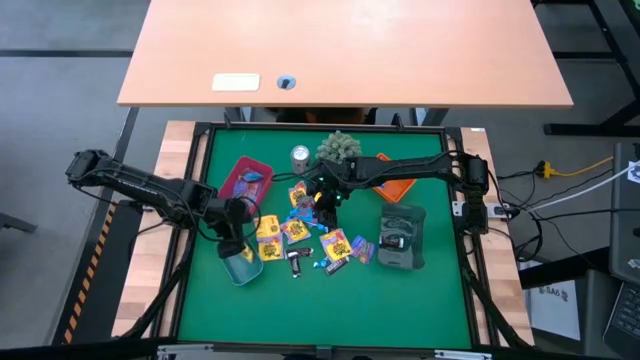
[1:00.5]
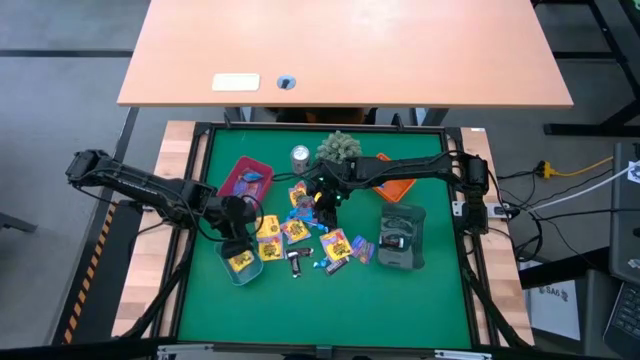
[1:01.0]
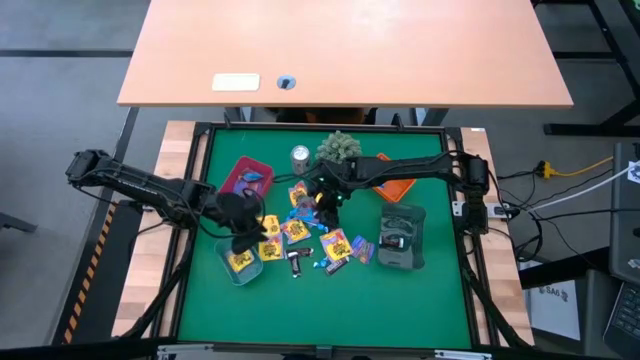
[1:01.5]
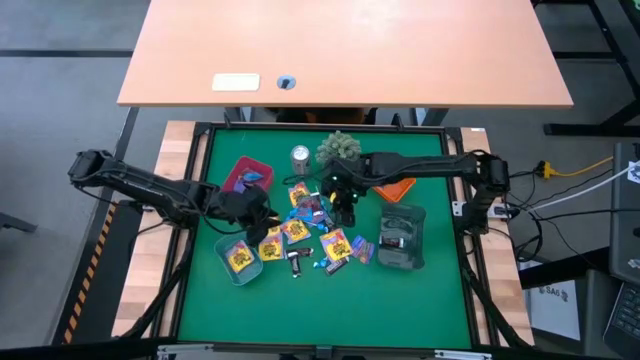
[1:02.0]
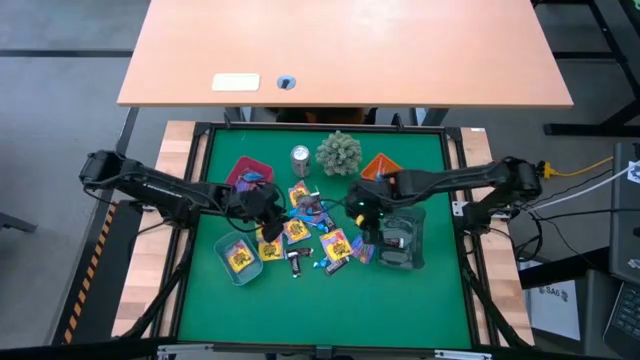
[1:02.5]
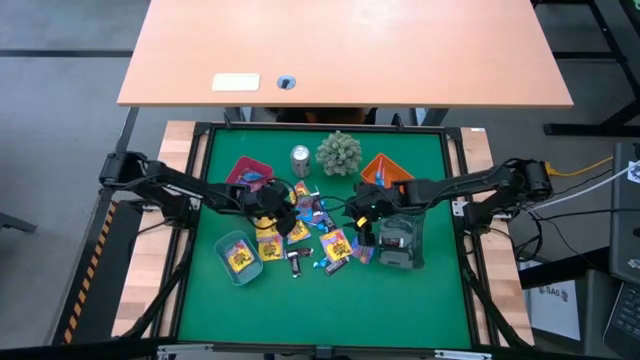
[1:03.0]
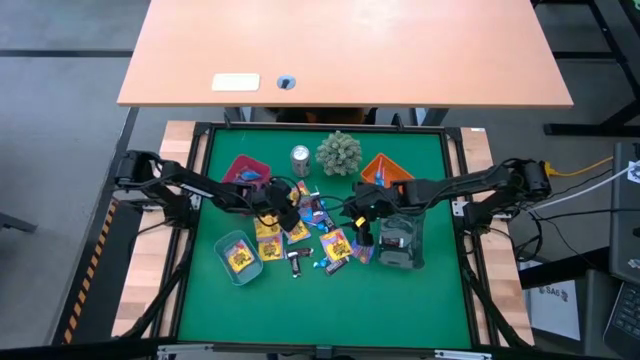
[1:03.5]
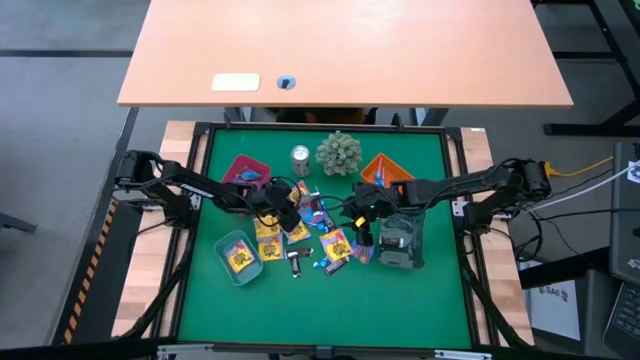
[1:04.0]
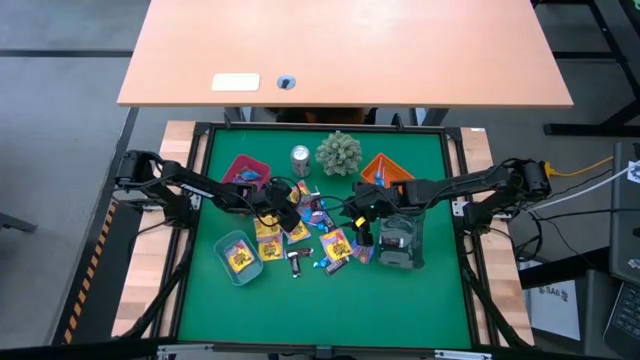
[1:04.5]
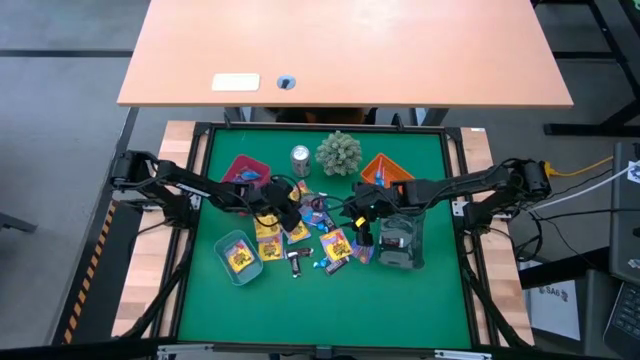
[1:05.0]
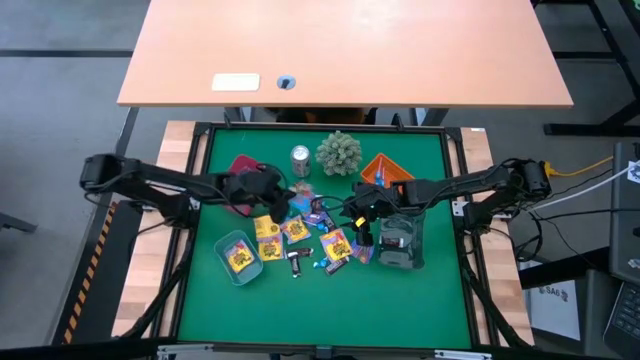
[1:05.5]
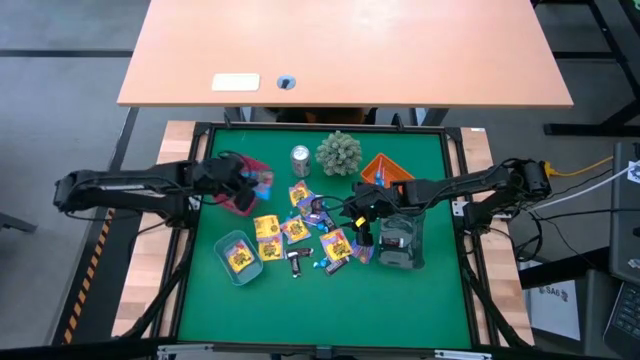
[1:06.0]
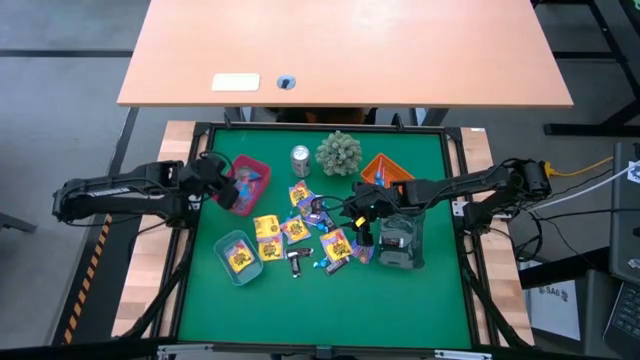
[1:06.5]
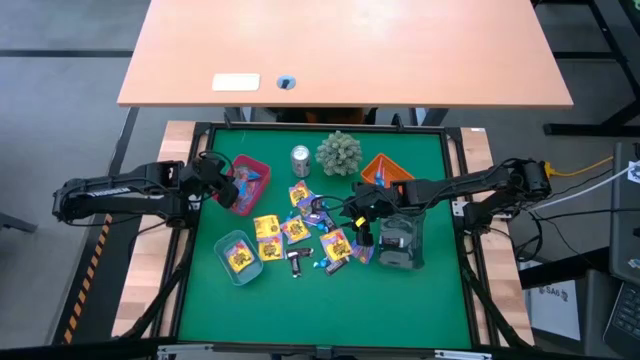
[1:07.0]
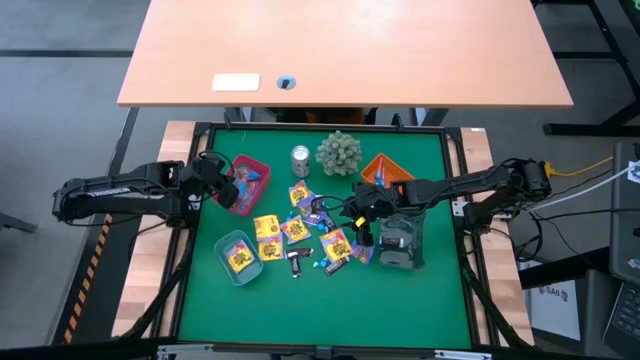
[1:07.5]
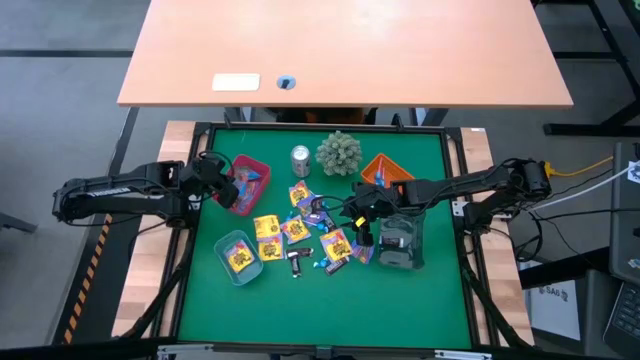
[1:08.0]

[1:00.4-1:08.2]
Task: Sort candy
Put the blue gummy into the red transparent bin

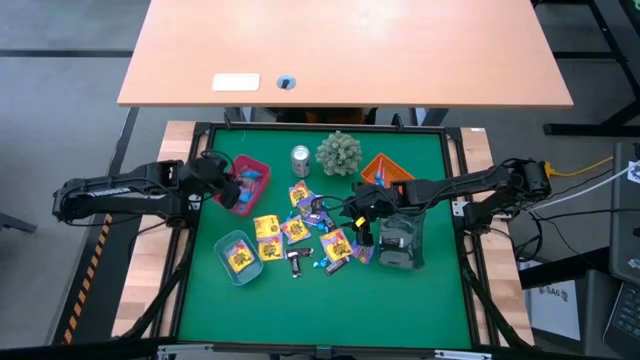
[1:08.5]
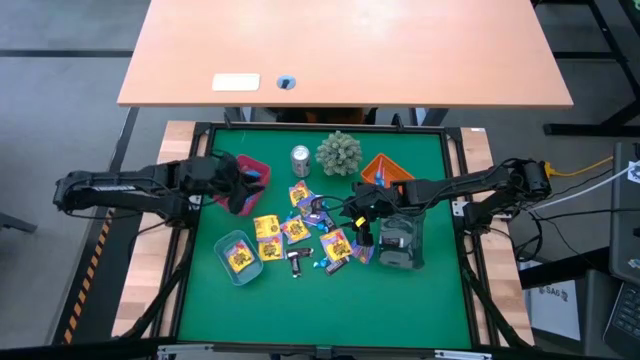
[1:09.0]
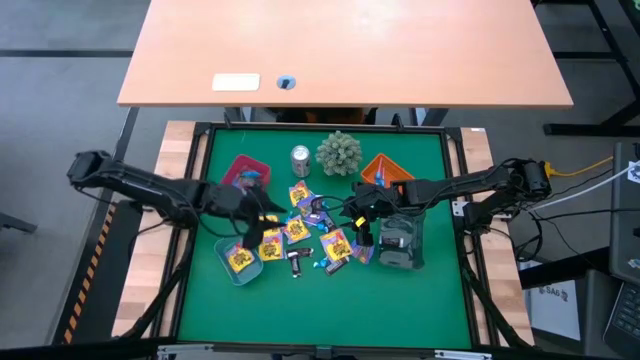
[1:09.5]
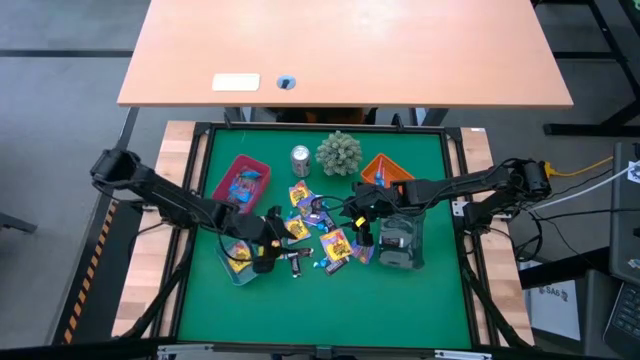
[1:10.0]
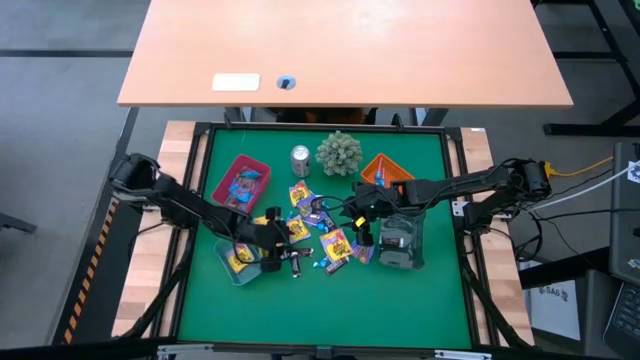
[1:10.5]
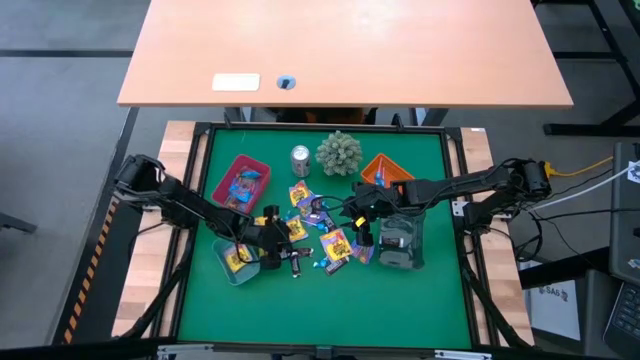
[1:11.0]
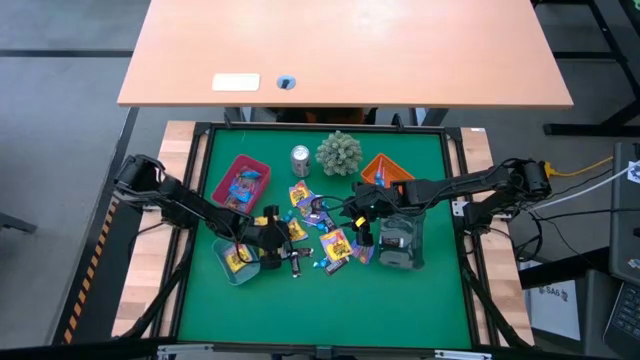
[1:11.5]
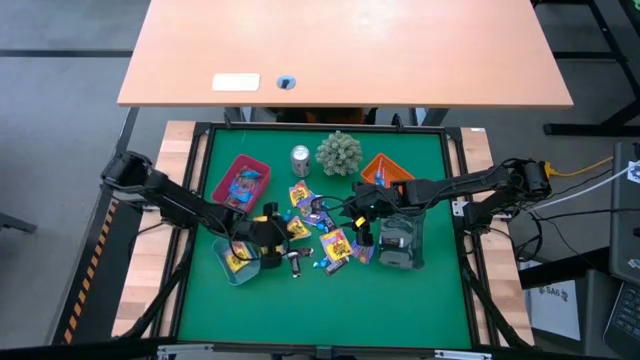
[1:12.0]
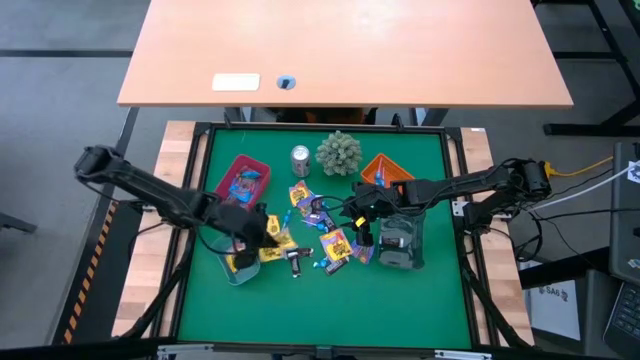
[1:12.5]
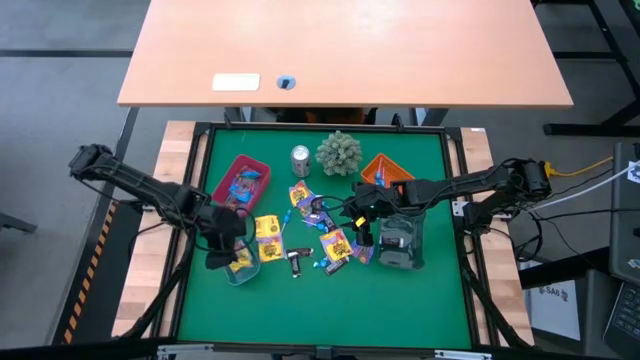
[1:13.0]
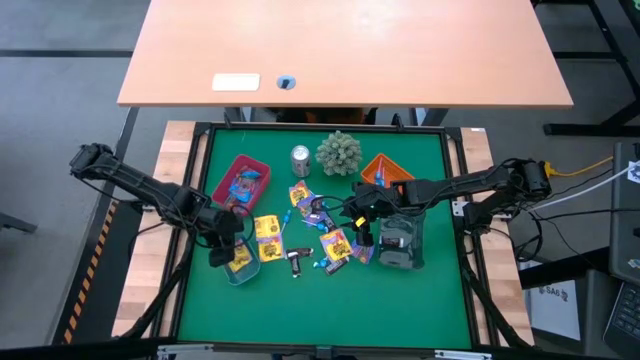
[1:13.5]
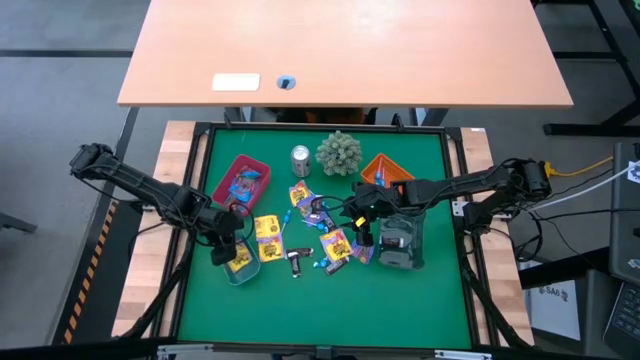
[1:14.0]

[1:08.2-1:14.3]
Put the yellow candy into the blue transparent bin

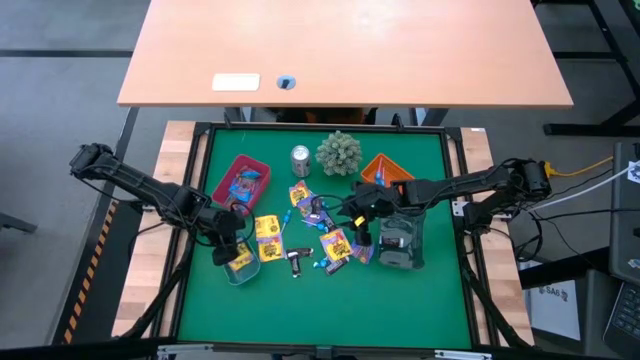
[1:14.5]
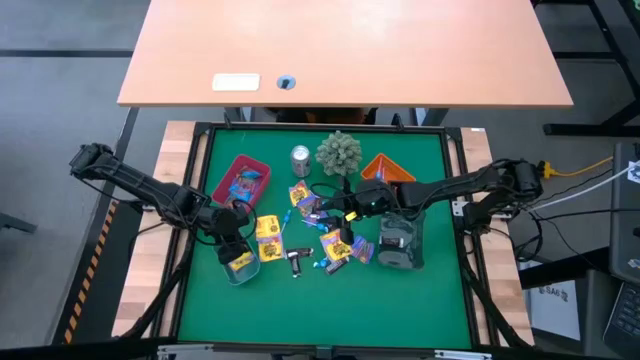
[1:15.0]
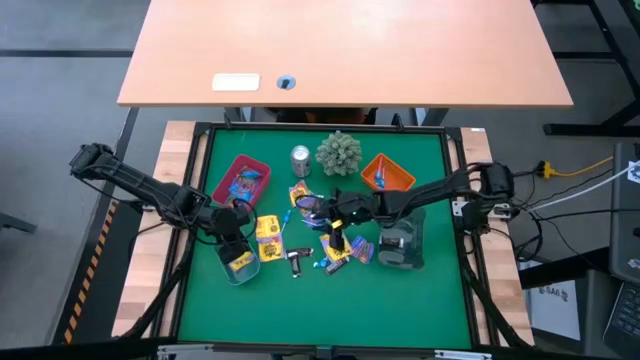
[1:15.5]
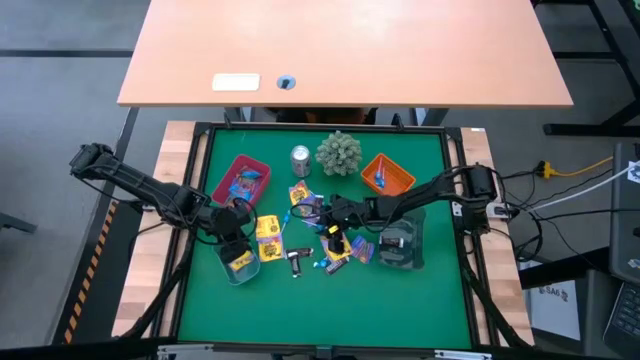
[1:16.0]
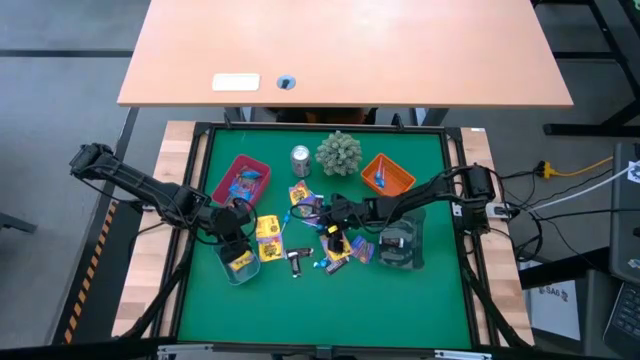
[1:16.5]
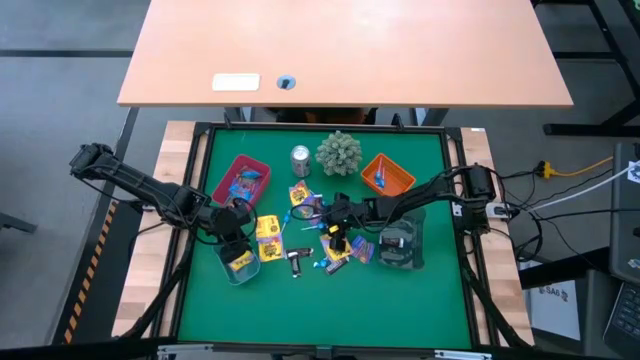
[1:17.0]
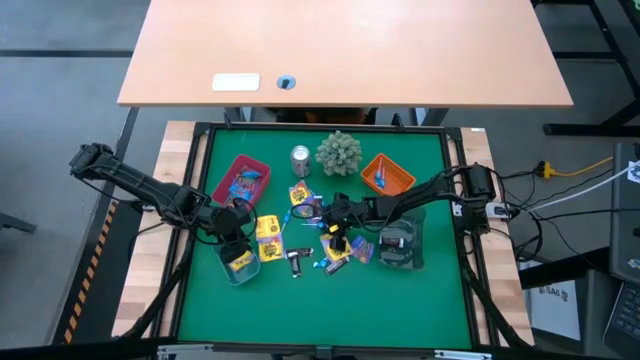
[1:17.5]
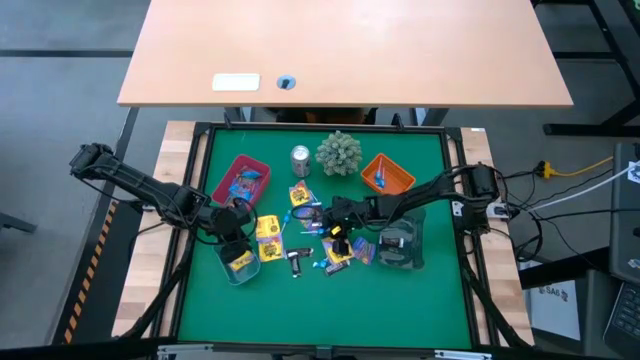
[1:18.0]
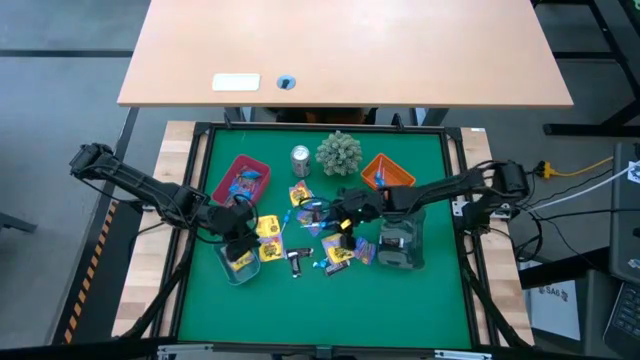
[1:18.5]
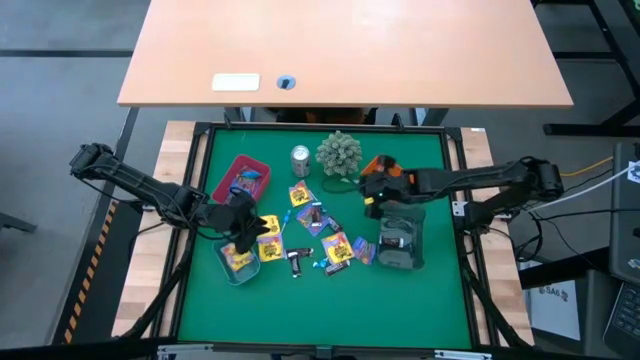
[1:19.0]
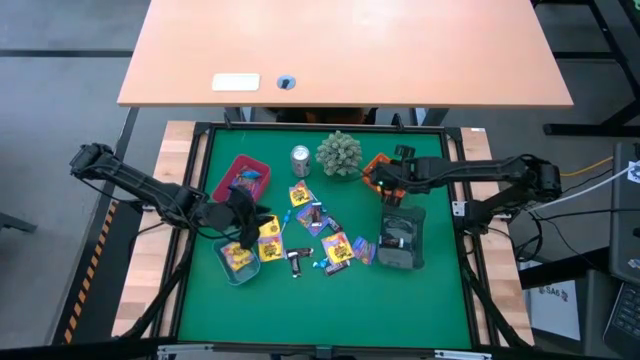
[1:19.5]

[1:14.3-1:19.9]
Put the blue candy into the orange bin

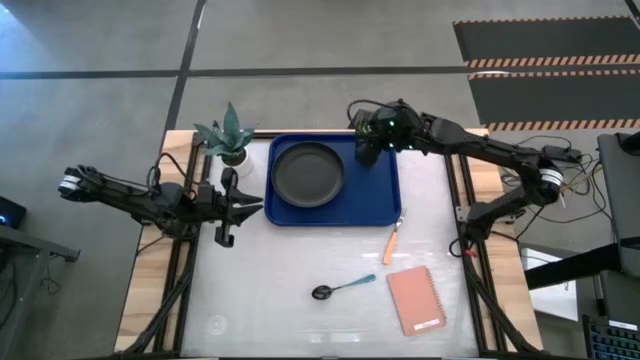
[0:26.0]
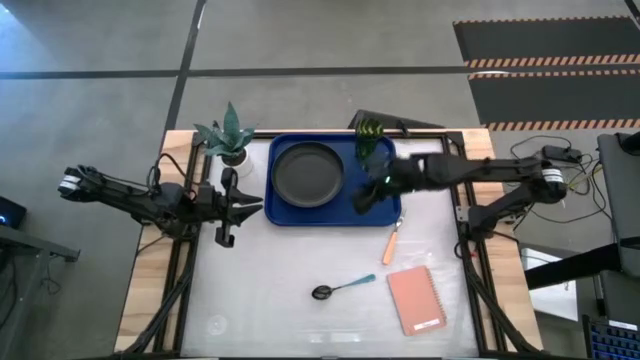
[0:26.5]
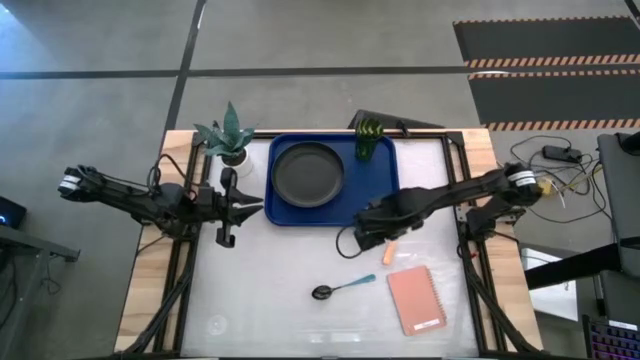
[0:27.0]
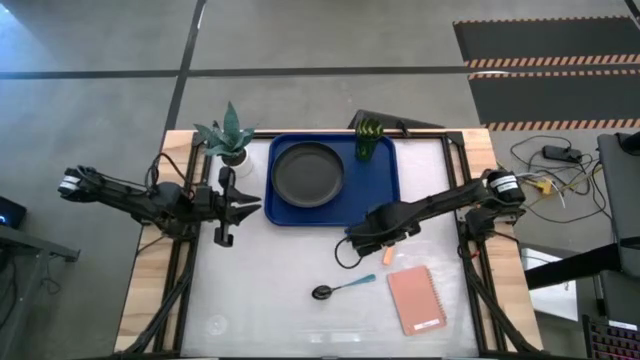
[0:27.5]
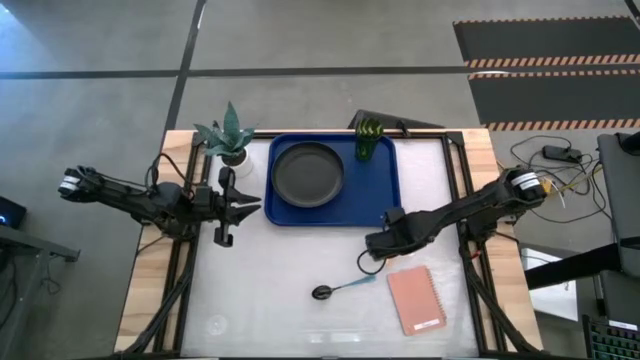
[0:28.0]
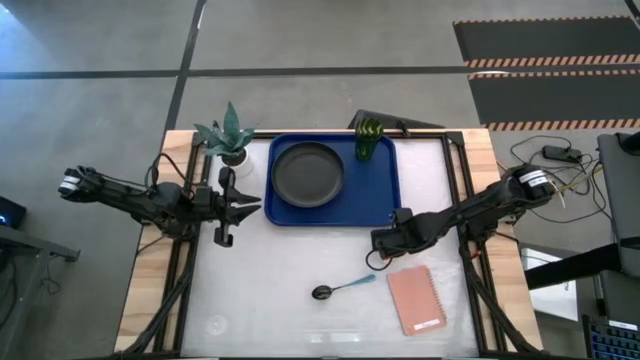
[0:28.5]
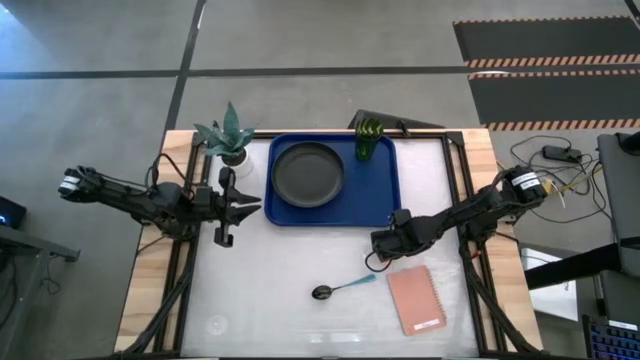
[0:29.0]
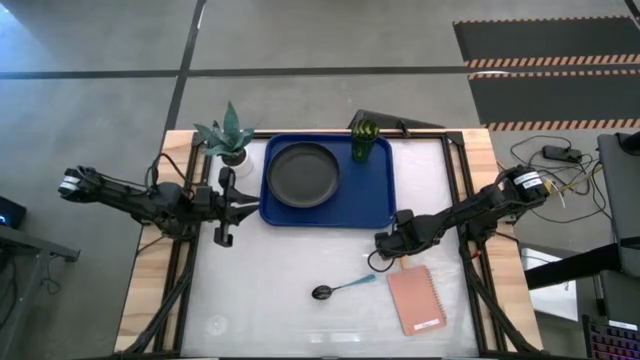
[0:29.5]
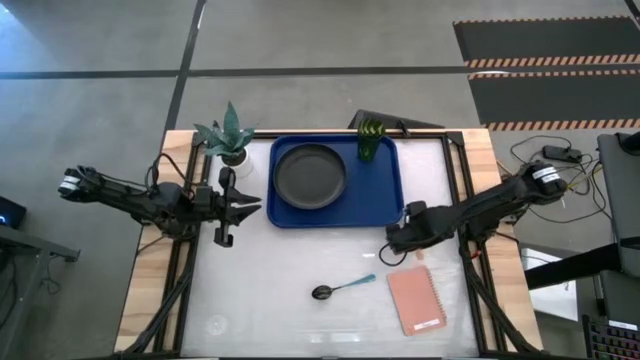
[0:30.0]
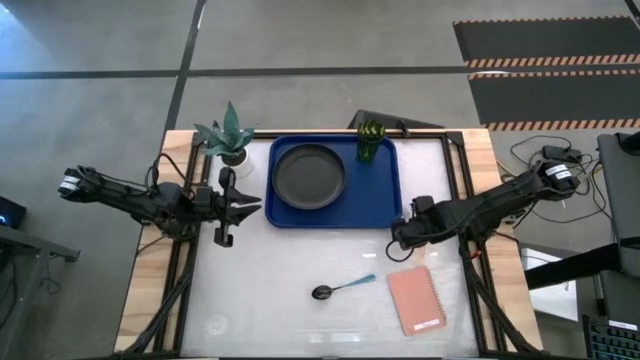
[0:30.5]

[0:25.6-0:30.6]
Task: Pick and place plate/cup/fork/spoon on tray
Put the orange fork to the bottom of the green cup on the blue tray
